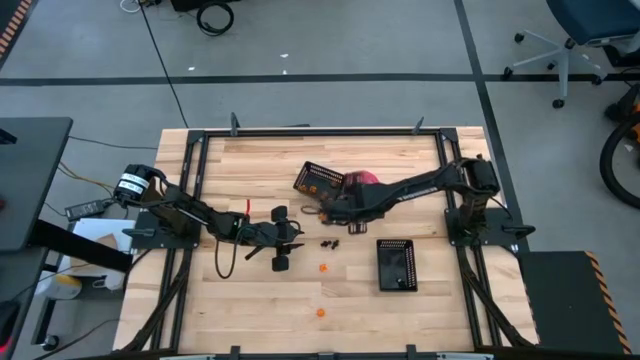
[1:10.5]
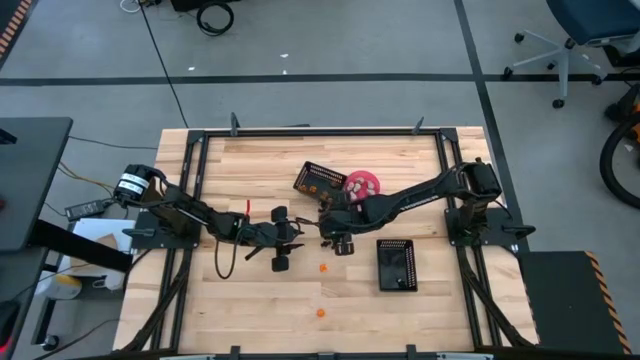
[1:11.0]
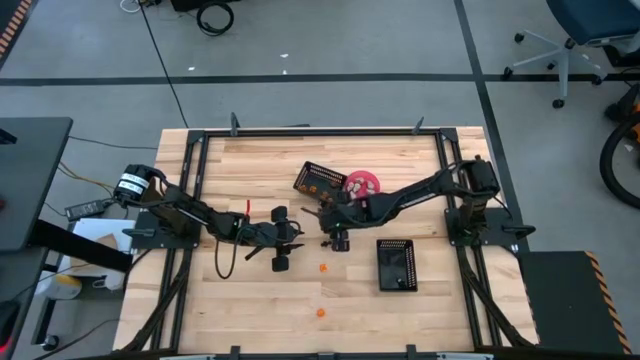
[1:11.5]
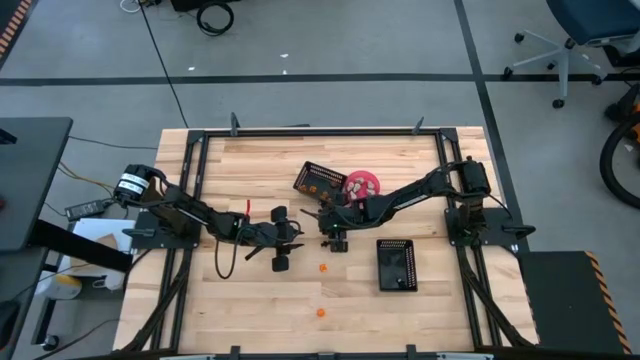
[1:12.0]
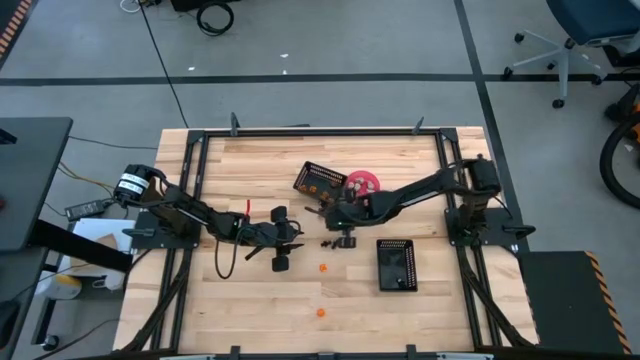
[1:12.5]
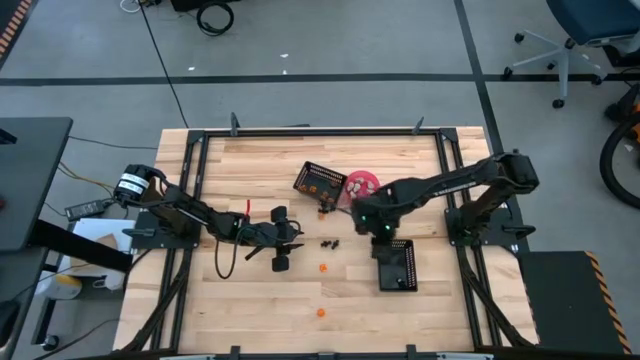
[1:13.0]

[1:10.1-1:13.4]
Task: Sort Halloween decoration
Put the black skeleton toy into the bottom black bin

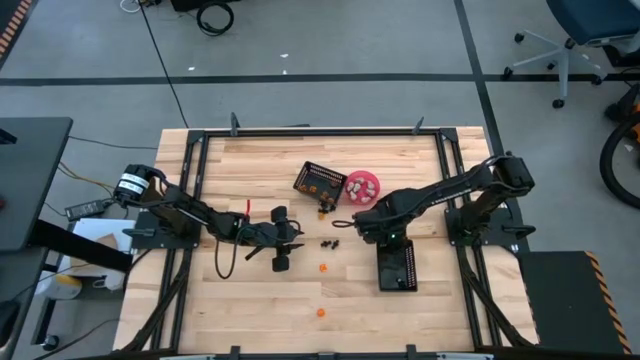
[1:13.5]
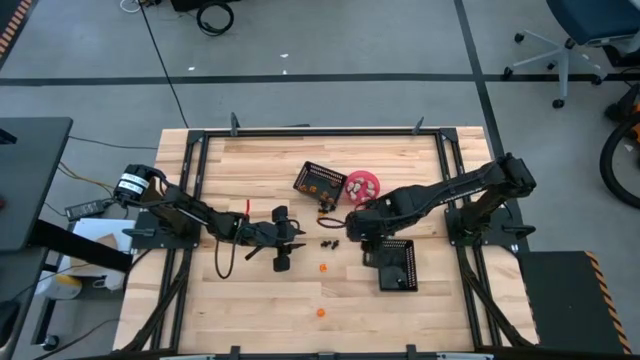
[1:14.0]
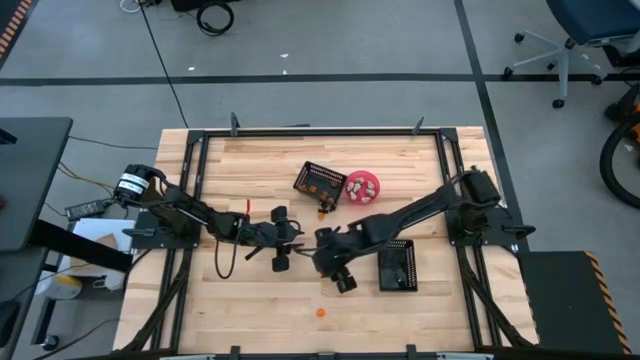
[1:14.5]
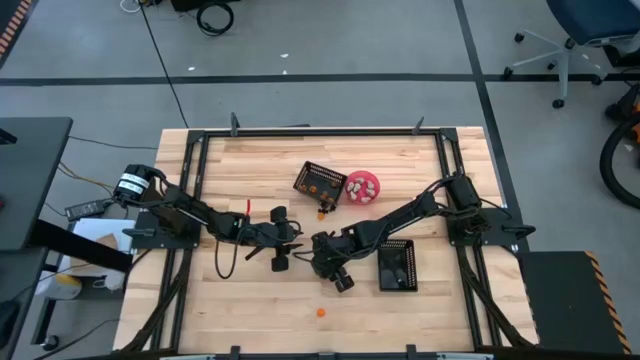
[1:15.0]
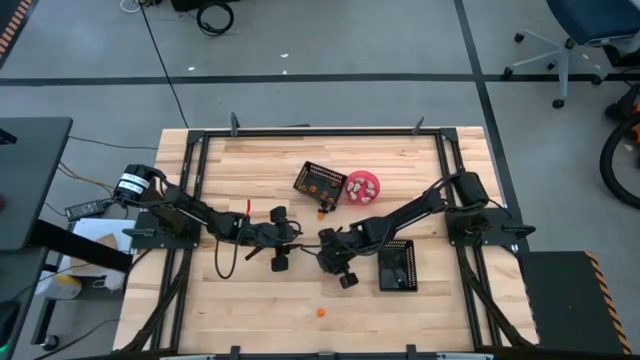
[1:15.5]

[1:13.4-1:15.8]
Put the orange pumpkin toy into the top black bin

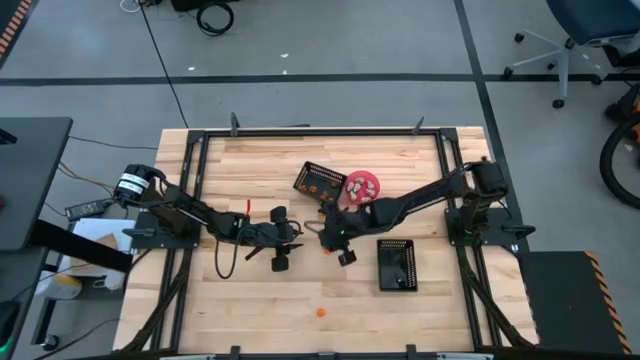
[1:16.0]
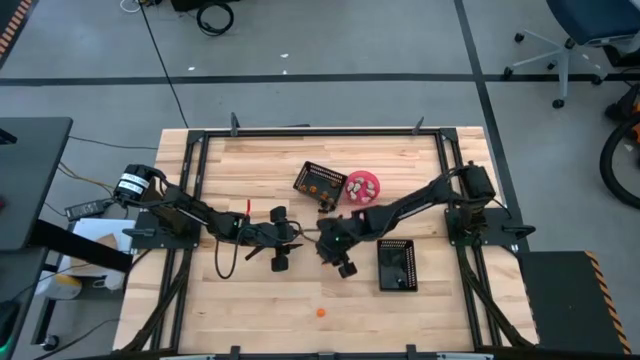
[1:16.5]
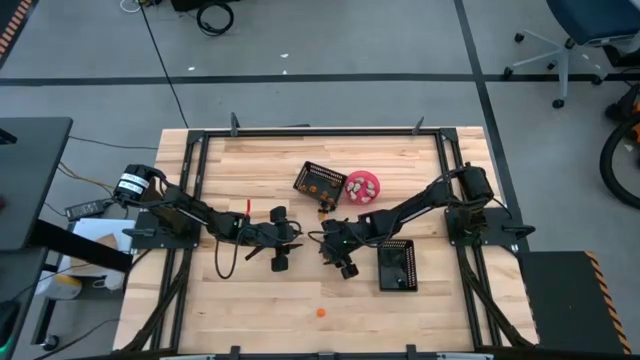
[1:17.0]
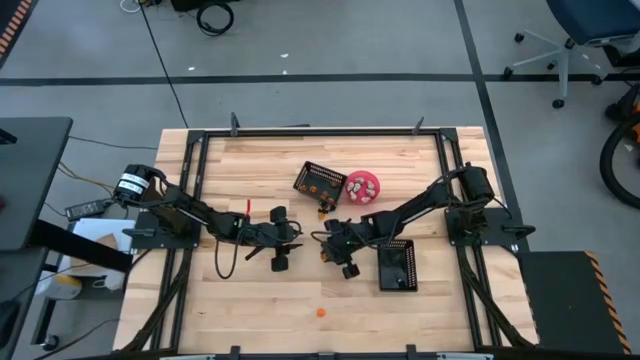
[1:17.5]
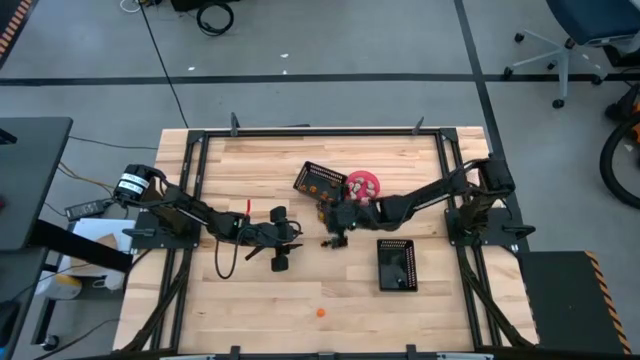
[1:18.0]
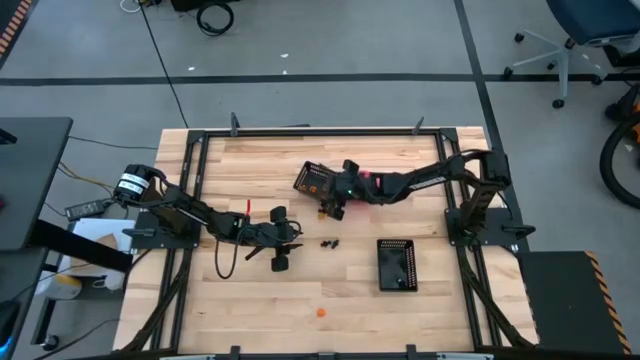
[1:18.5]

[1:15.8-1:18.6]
Put the orange pumpkin toy into the top black bin

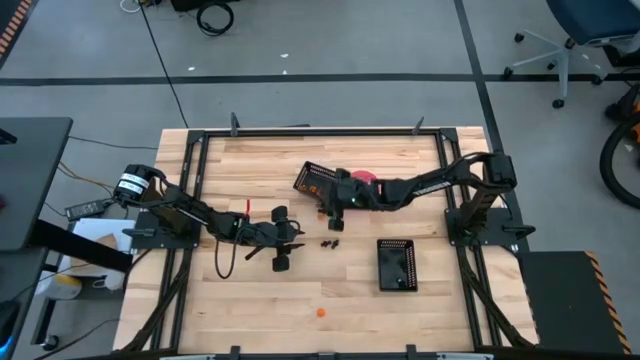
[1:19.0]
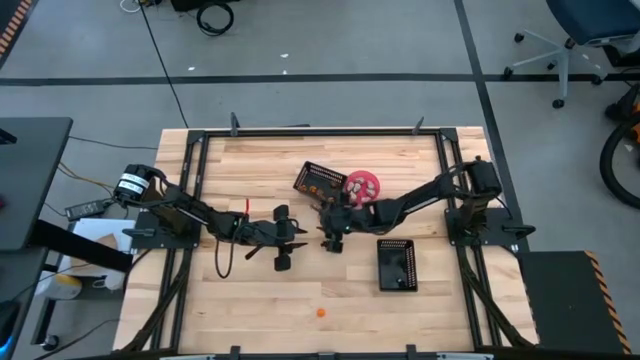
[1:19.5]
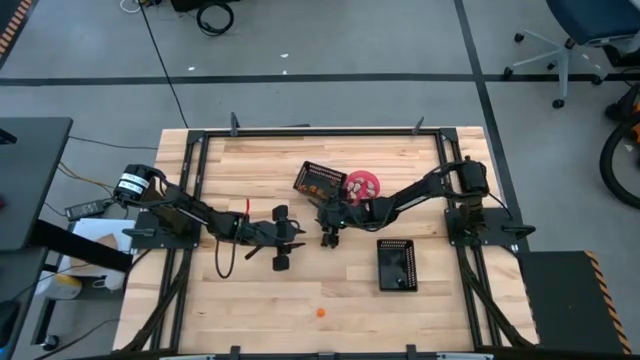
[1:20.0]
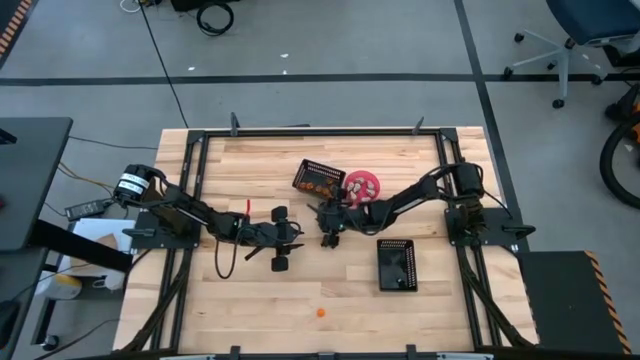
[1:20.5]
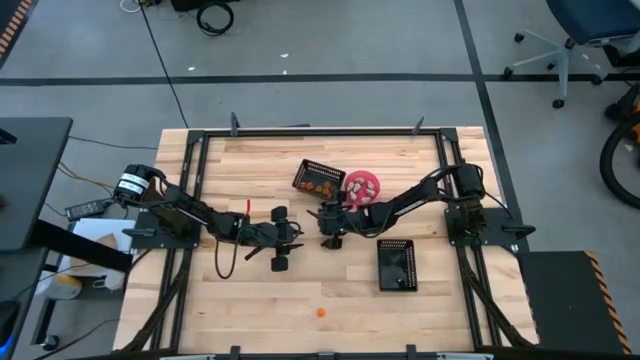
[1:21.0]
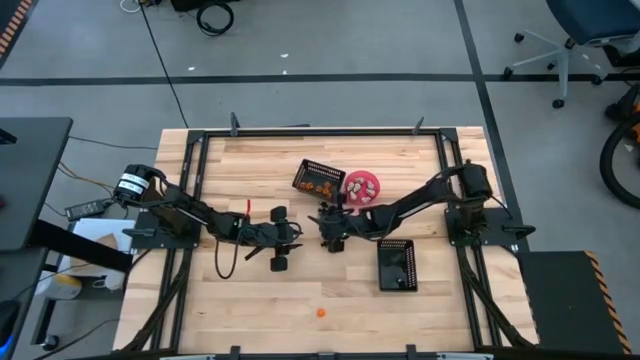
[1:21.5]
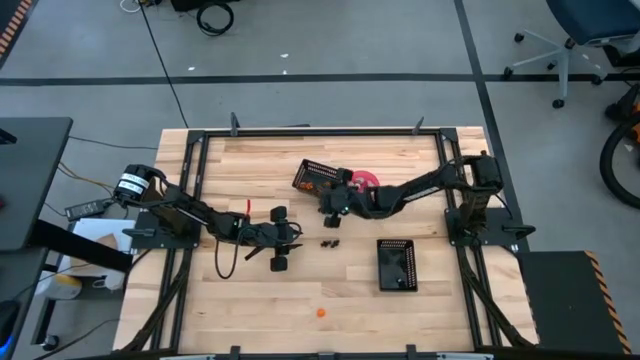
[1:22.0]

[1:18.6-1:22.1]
Put the orange pumpkin toy into the top black bin

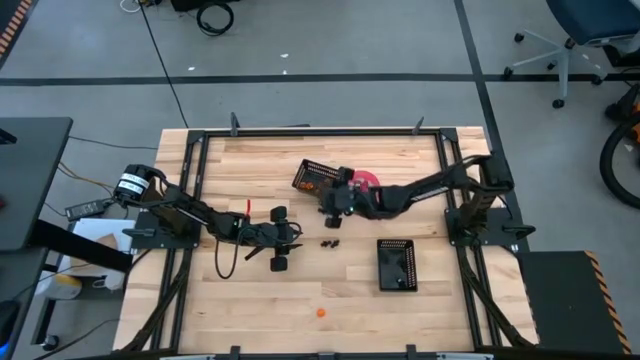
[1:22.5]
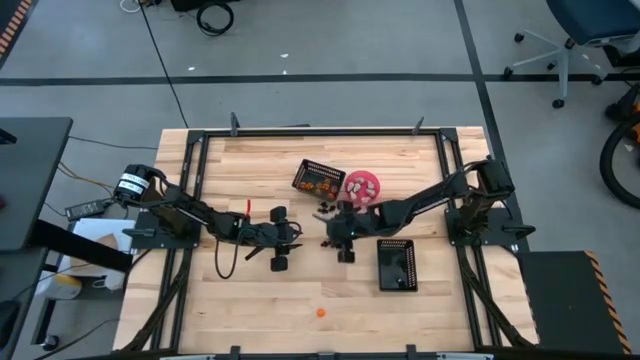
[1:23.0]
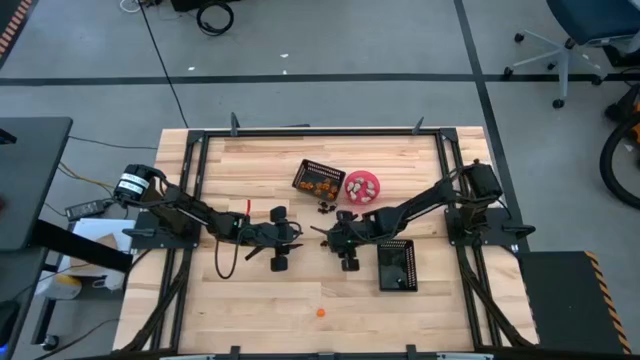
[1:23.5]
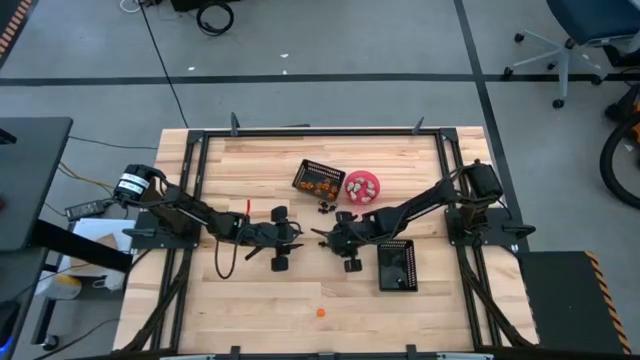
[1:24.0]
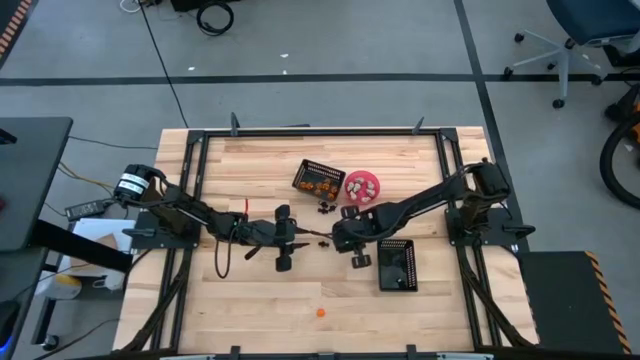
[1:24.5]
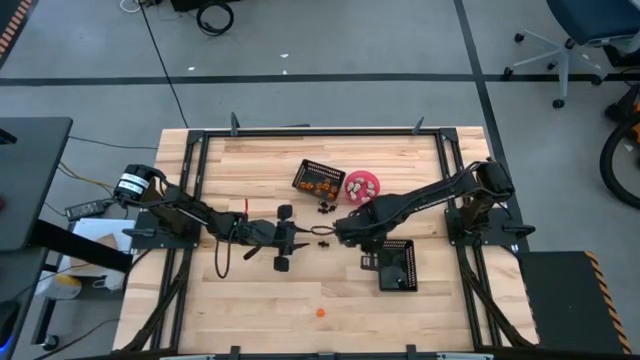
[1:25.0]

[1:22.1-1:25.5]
Put the black skeleton toy into the bottom black bin

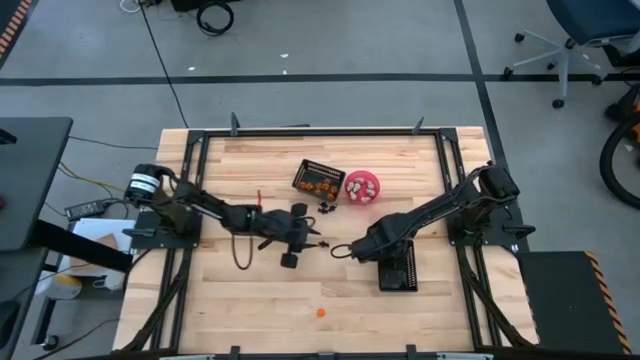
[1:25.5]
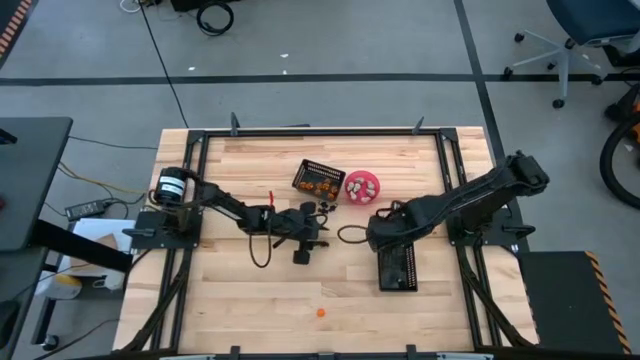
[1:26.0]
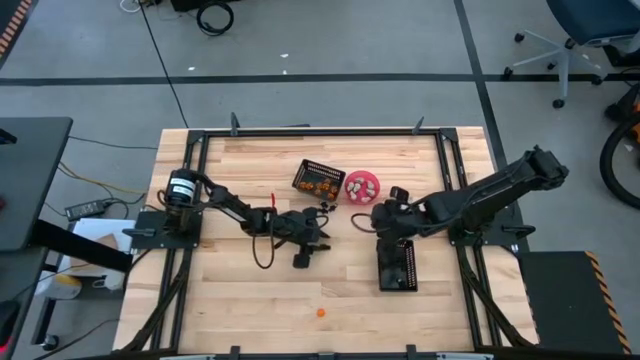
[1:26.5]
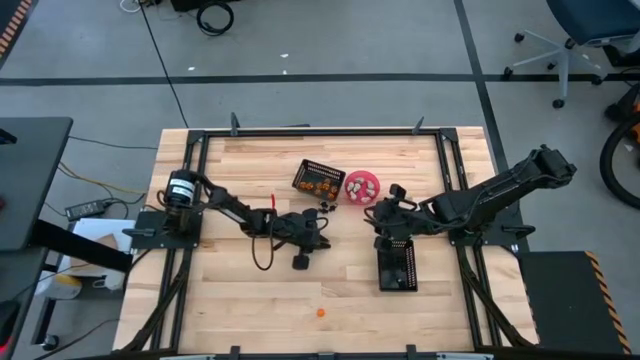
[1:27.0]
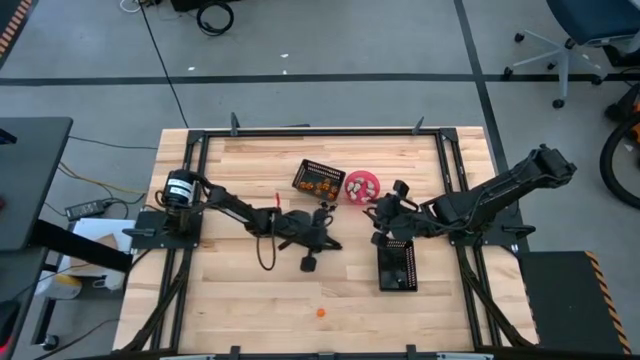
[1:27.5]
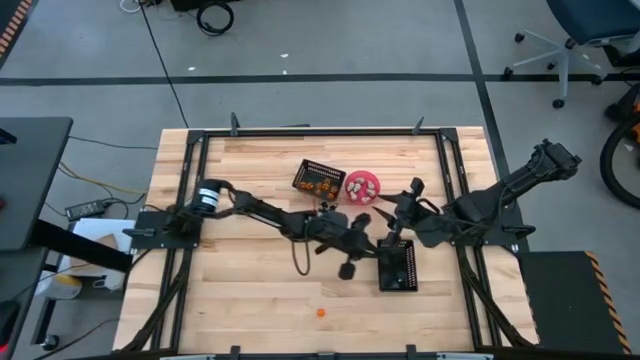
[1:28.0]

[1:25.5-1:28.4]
Put the black skeleton toy into the bottom black bin

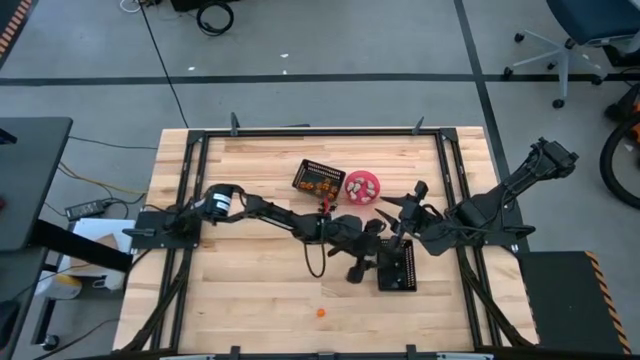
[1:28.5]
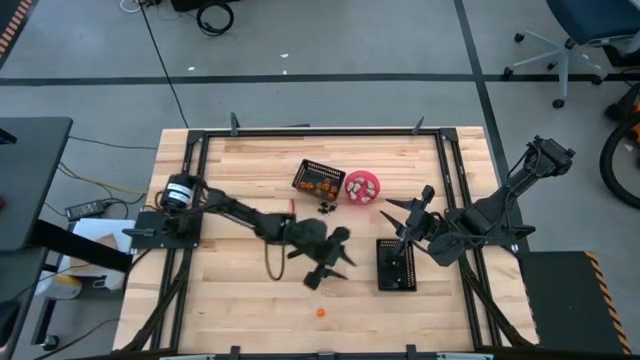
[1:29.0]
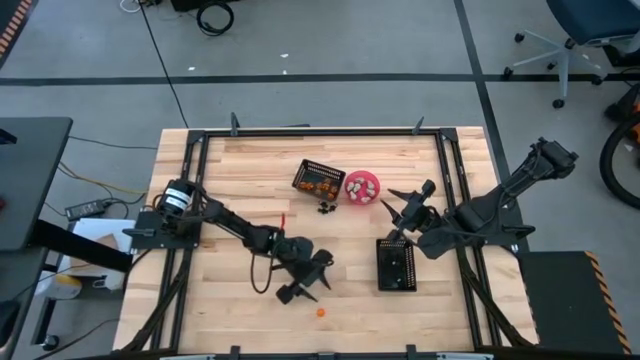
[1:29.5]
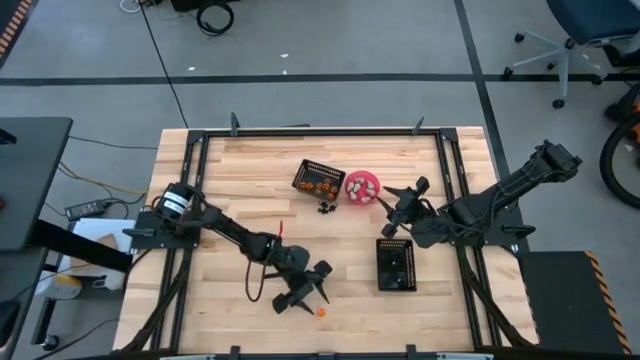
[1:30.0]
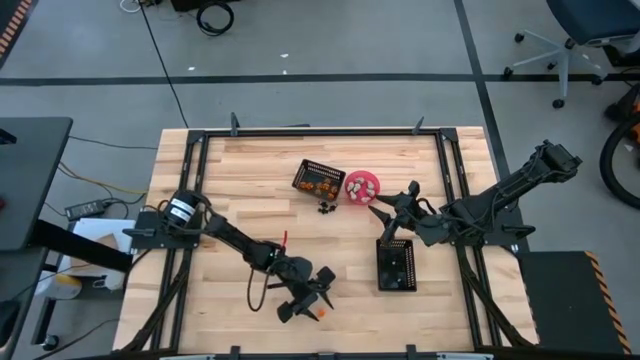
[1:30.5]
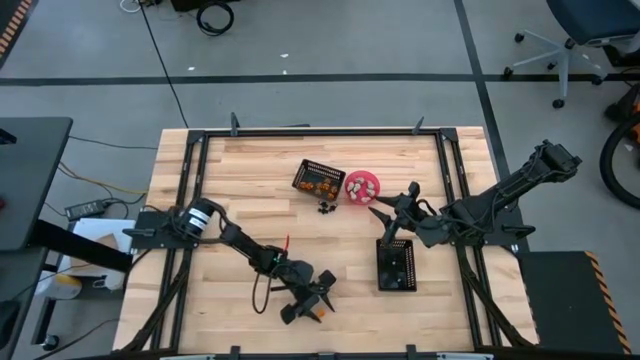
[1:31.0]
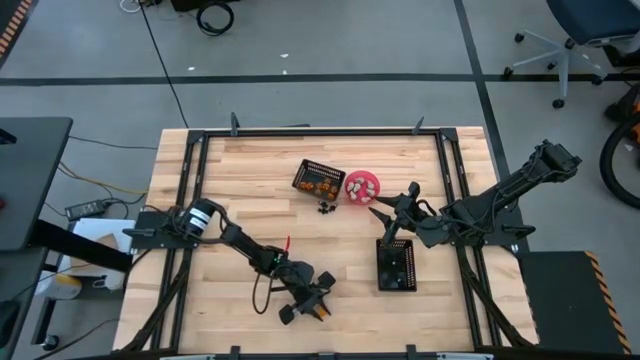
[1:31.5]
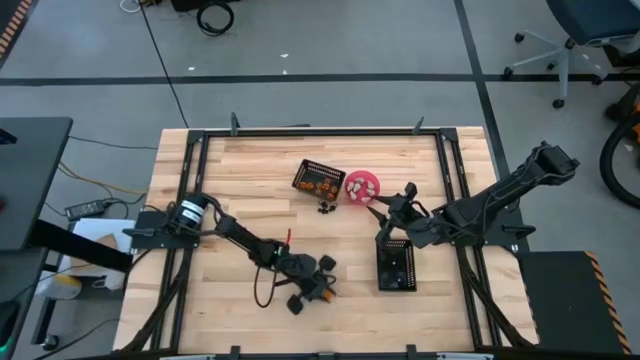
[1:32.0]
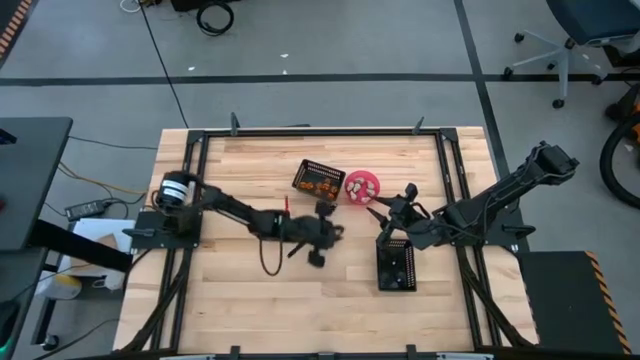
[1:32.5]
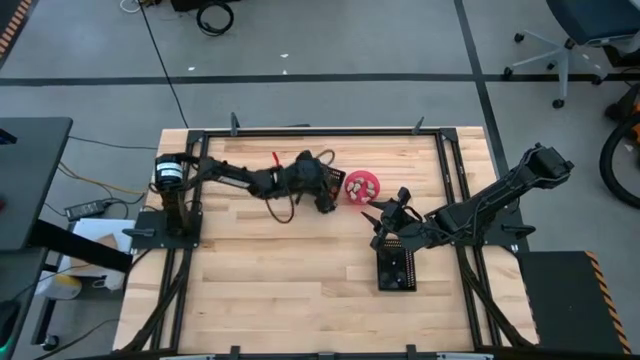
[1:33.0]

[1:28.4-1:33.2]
Put the orange pumpkin toy into the top black bin
